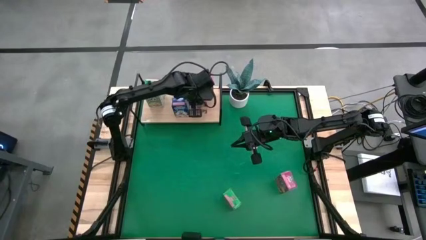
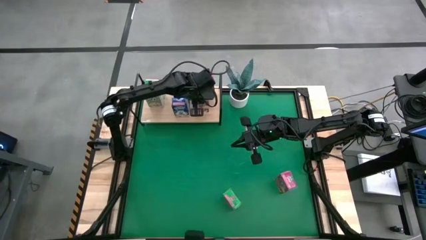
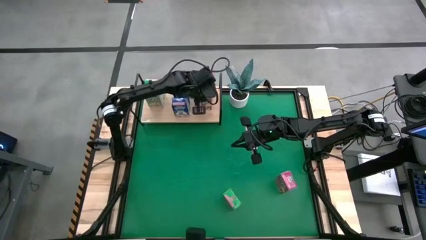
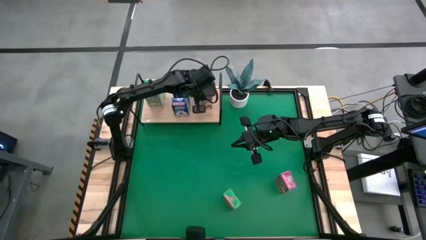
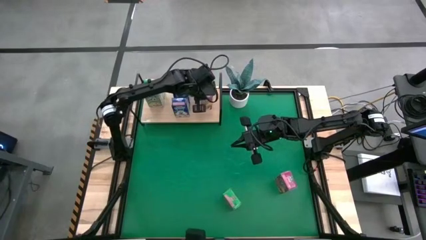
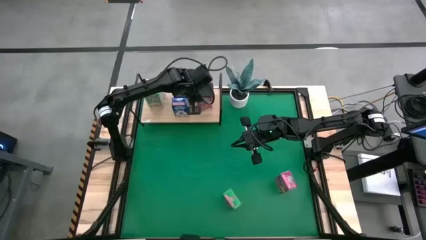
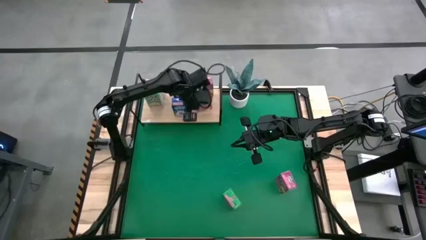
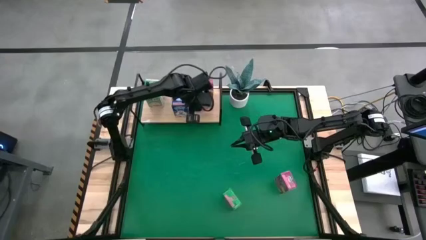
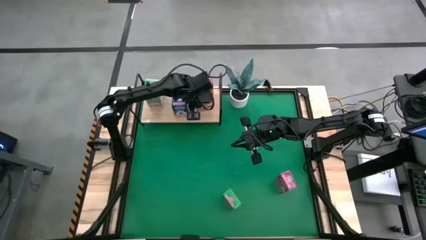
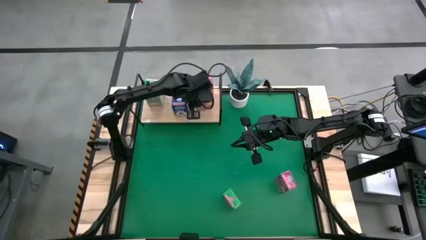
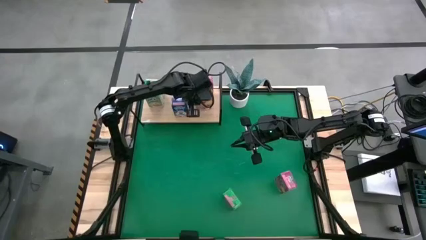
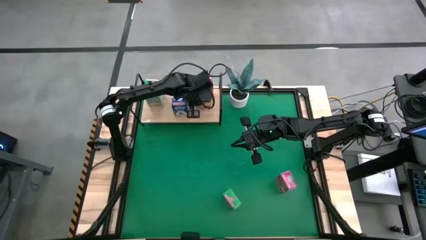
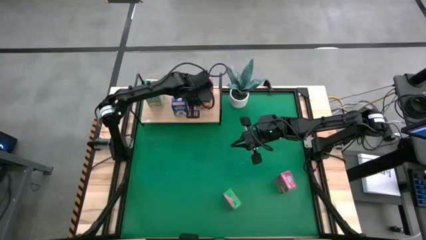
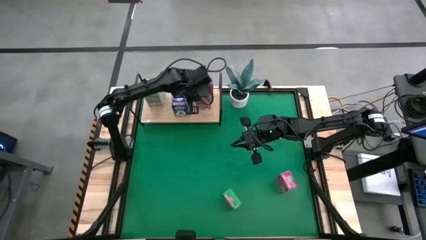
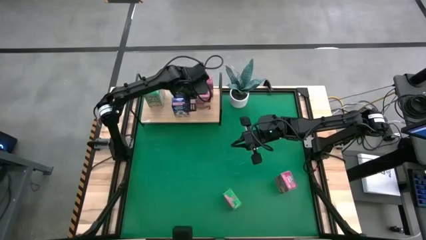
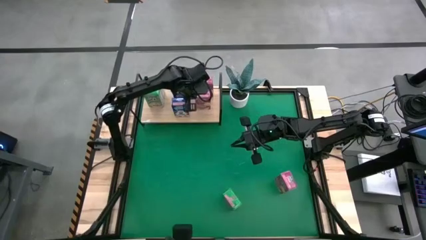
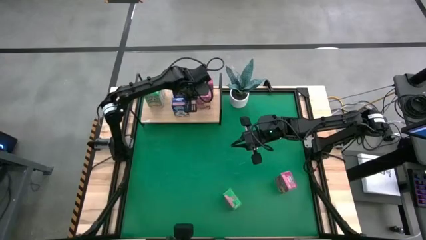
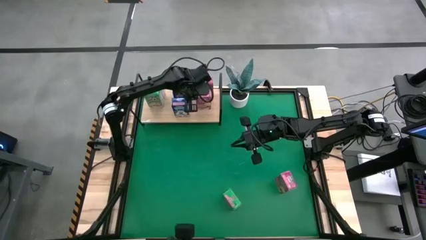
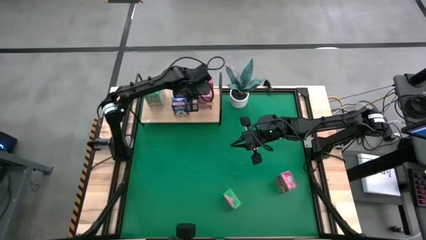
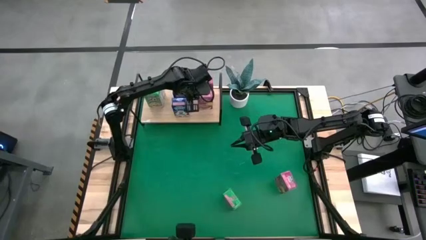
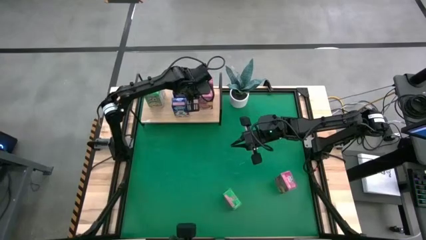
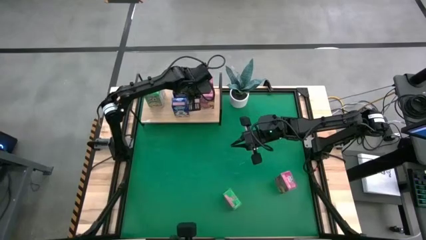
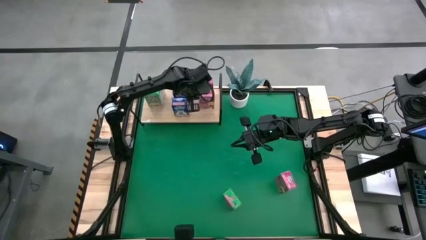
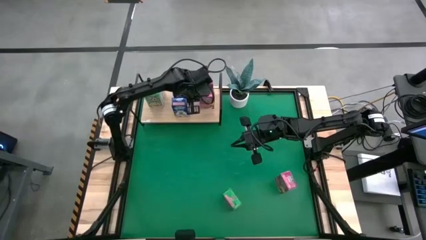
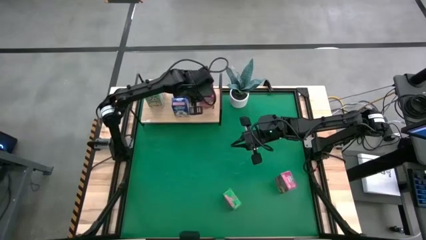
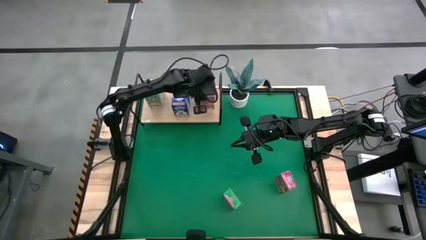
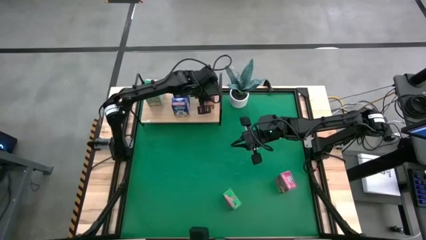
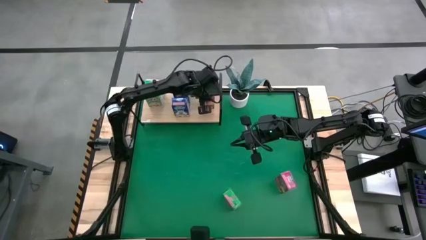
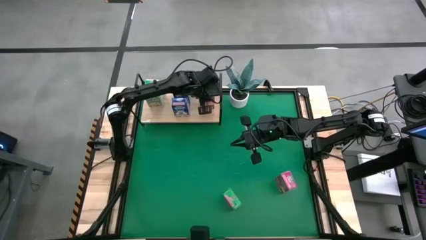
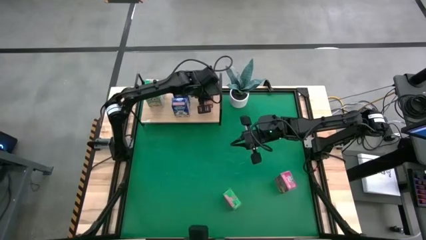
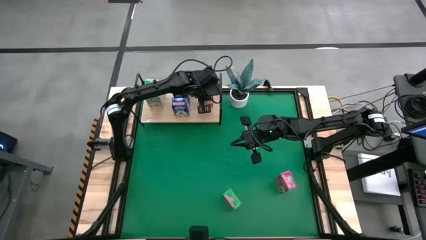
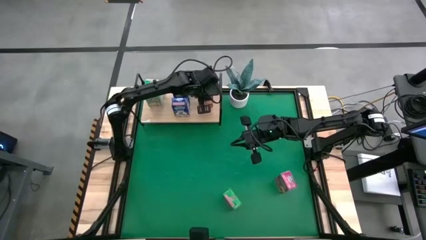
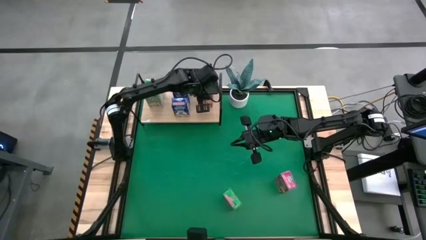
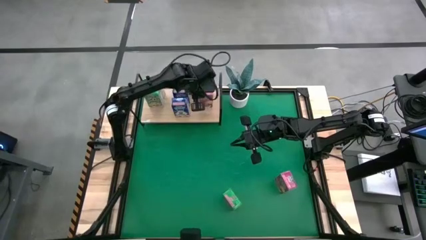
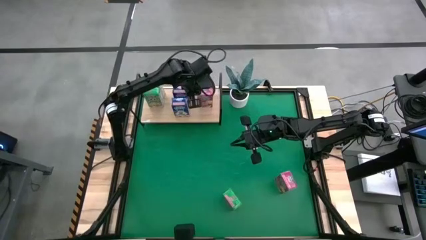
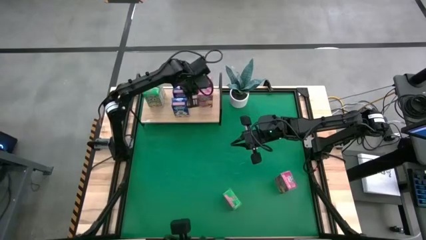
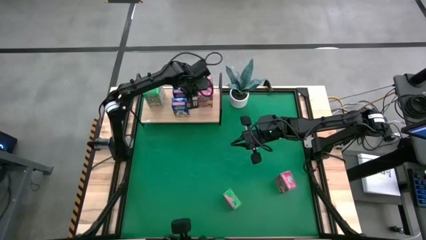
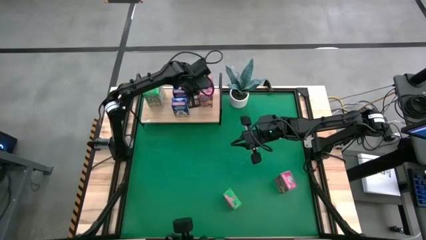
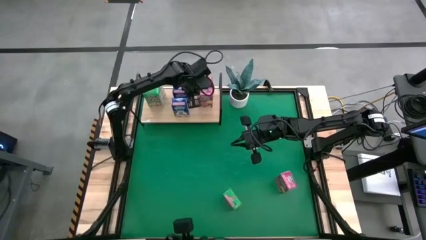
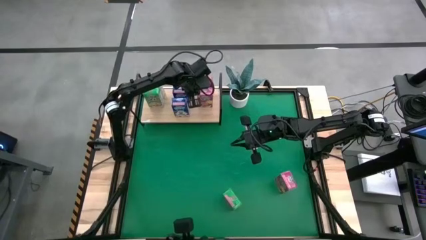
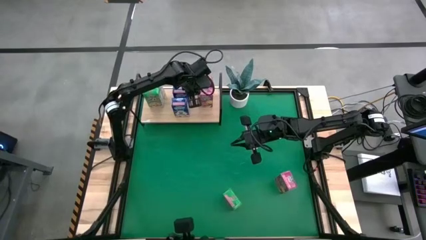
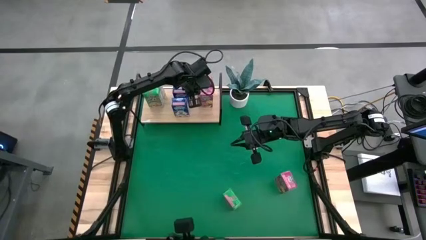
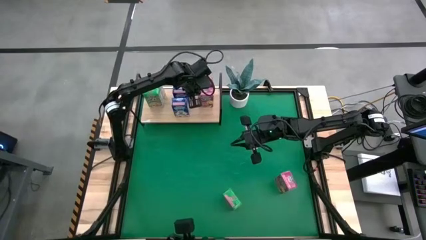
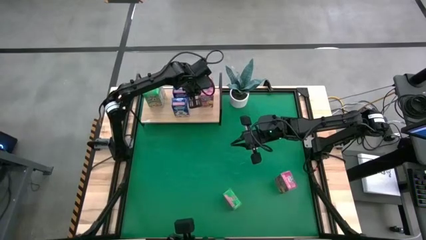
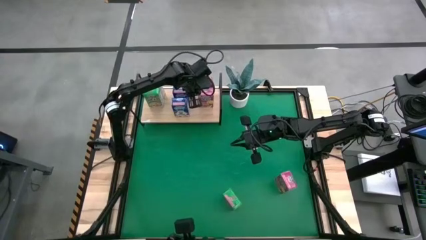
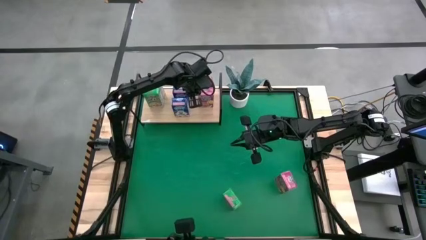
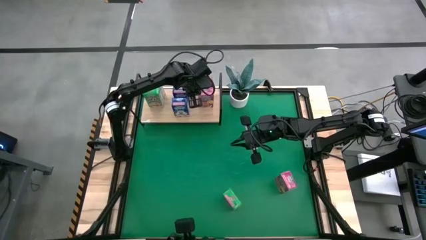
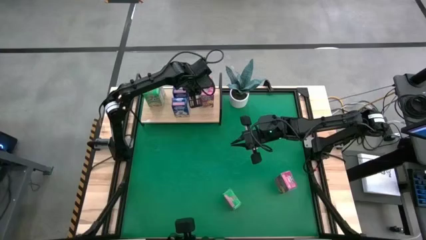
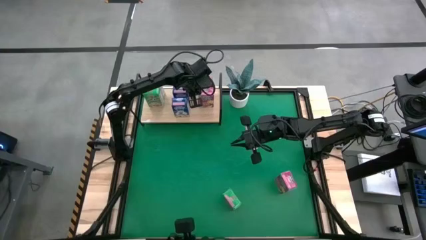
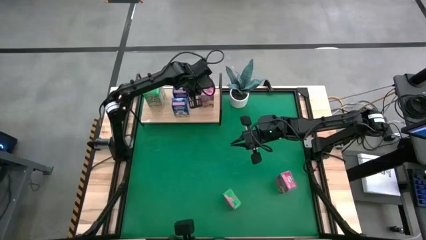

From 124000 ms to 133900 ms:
Task: Stack cereal on shelf
Put the left pink cereal box on the shelf aligned with the other pink cereal box
